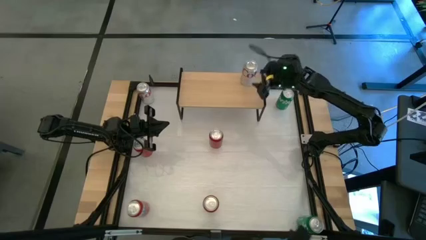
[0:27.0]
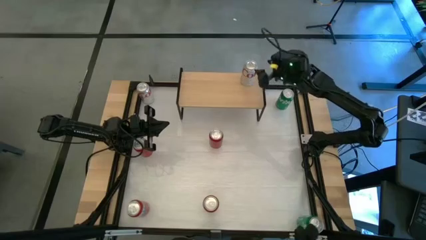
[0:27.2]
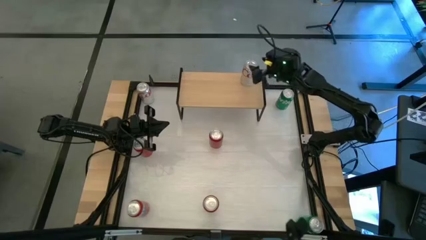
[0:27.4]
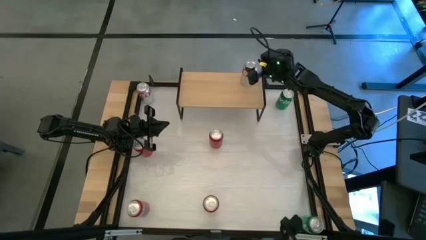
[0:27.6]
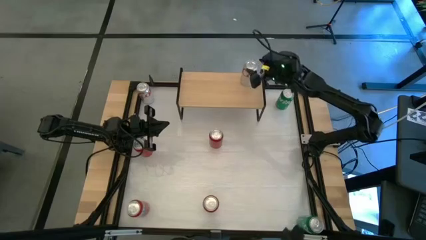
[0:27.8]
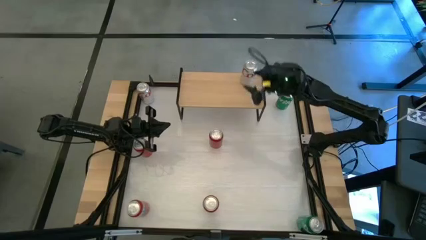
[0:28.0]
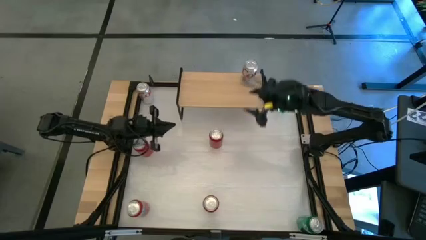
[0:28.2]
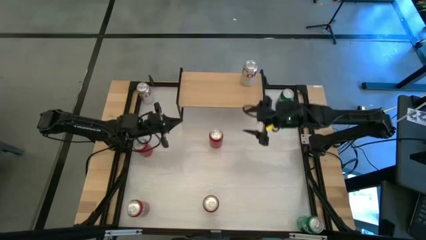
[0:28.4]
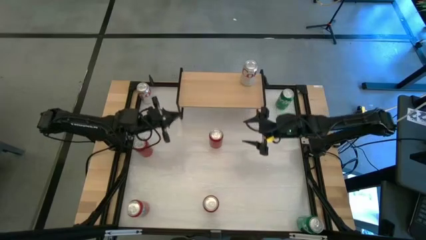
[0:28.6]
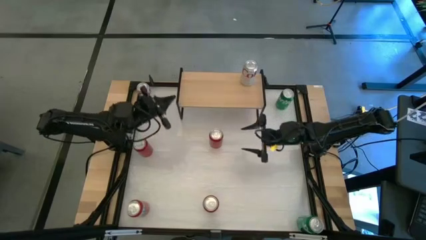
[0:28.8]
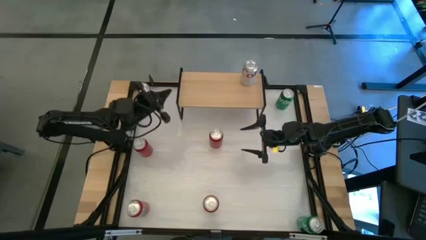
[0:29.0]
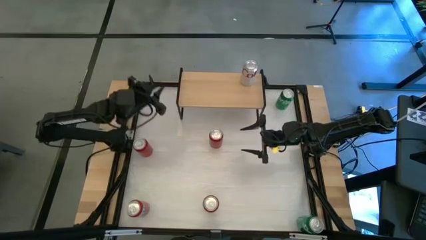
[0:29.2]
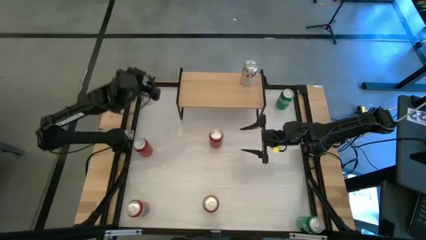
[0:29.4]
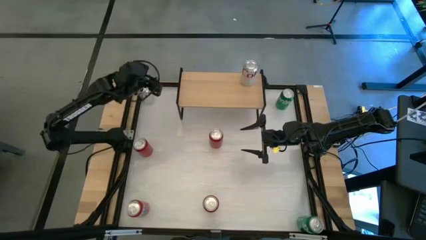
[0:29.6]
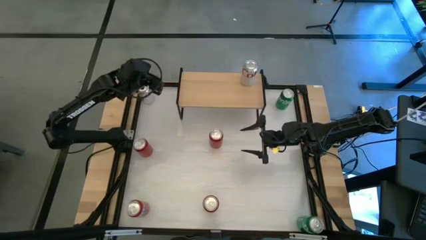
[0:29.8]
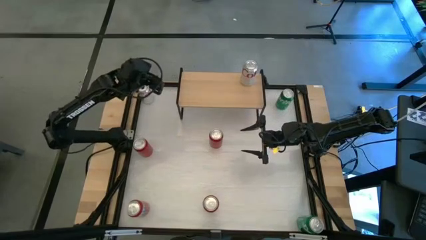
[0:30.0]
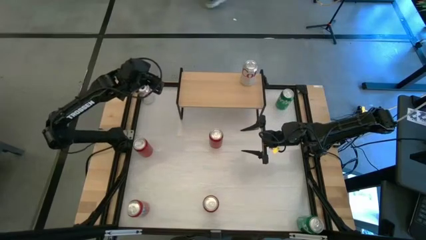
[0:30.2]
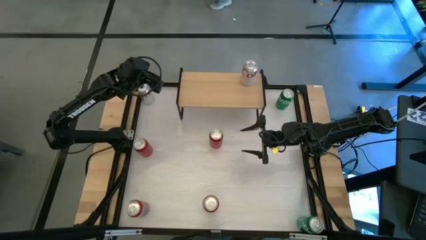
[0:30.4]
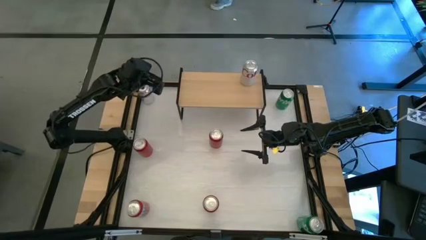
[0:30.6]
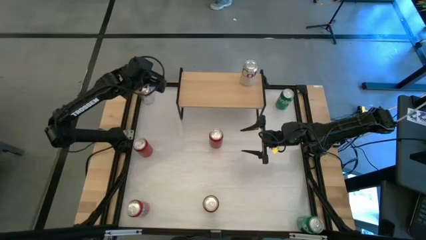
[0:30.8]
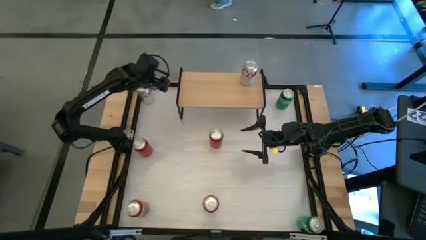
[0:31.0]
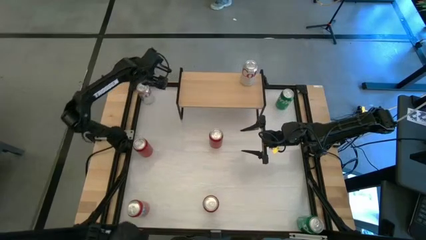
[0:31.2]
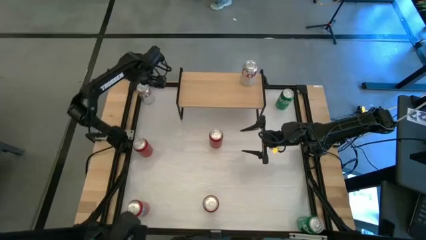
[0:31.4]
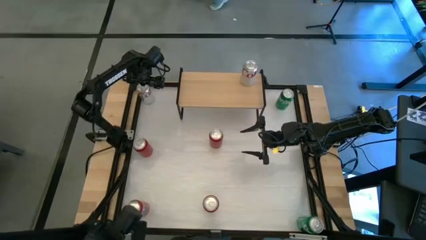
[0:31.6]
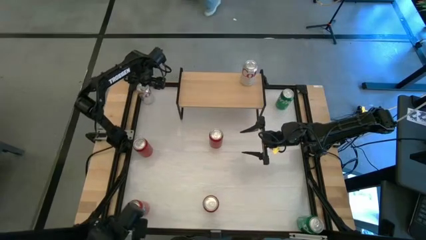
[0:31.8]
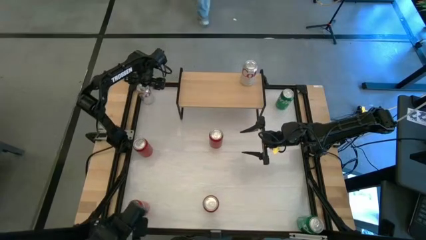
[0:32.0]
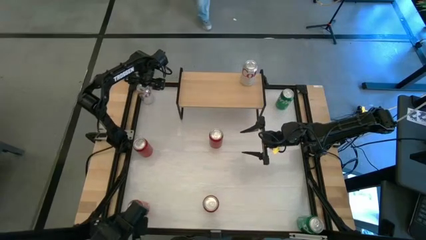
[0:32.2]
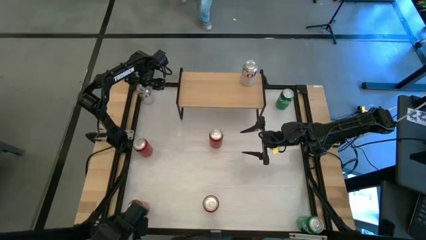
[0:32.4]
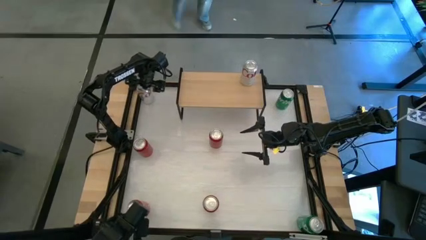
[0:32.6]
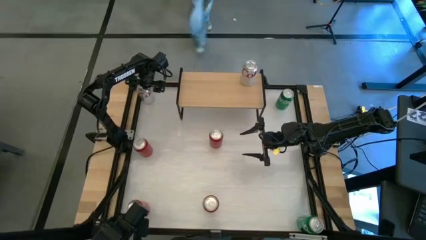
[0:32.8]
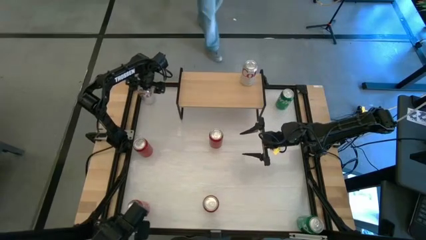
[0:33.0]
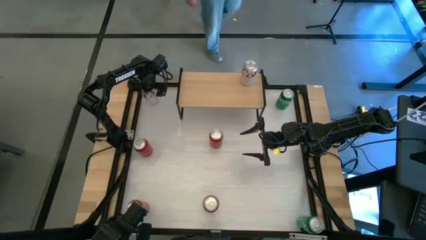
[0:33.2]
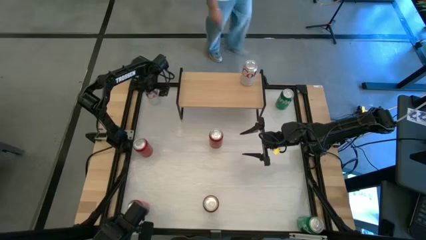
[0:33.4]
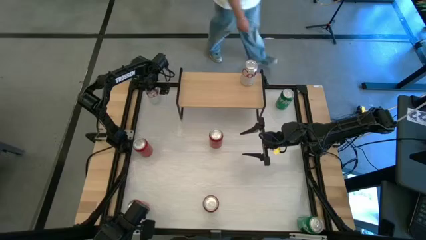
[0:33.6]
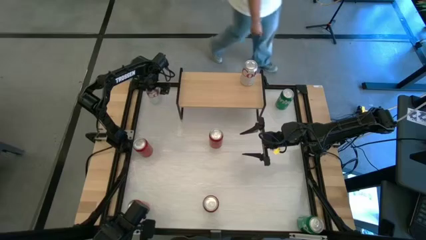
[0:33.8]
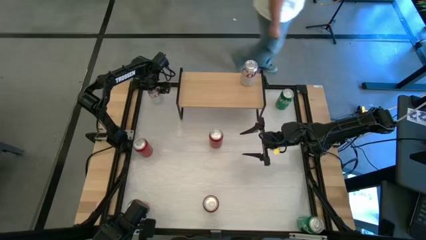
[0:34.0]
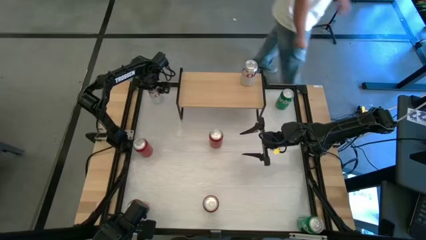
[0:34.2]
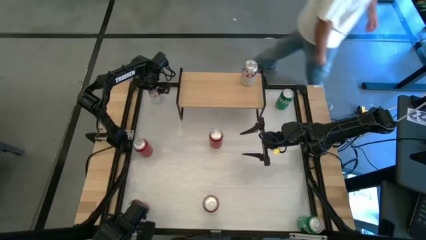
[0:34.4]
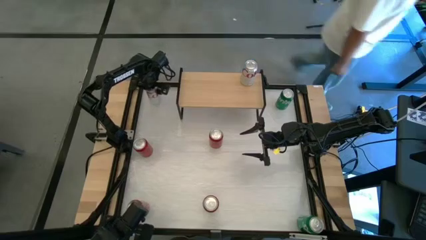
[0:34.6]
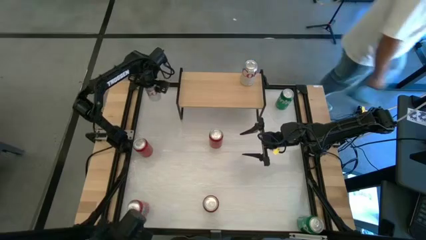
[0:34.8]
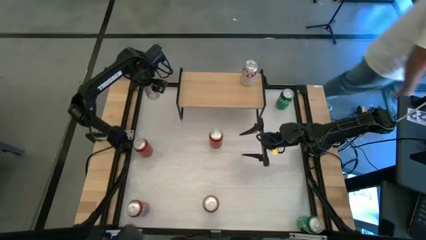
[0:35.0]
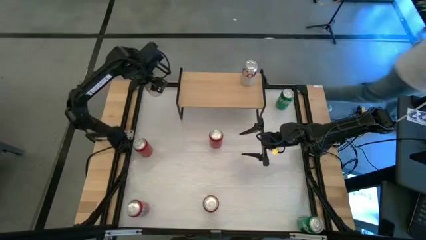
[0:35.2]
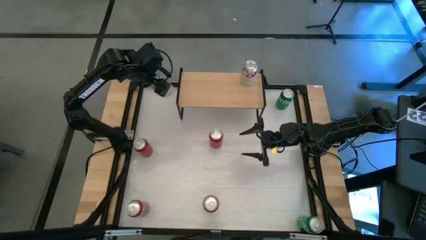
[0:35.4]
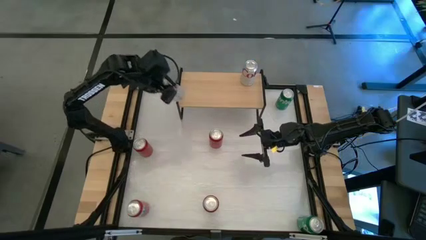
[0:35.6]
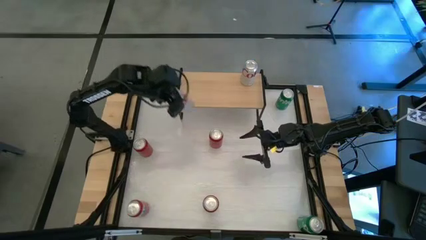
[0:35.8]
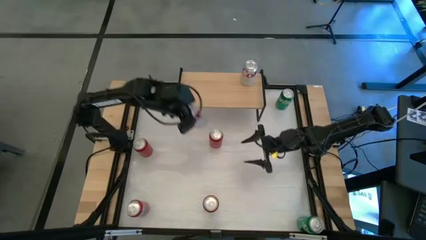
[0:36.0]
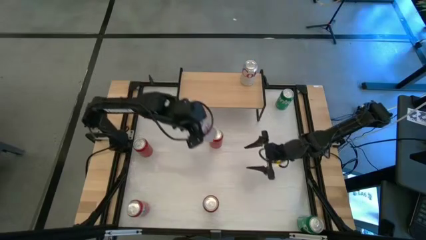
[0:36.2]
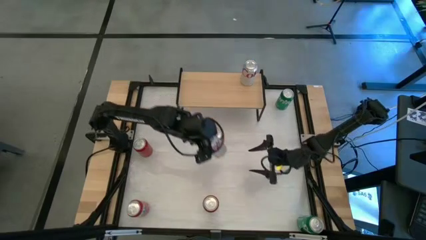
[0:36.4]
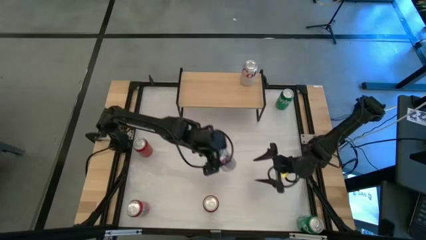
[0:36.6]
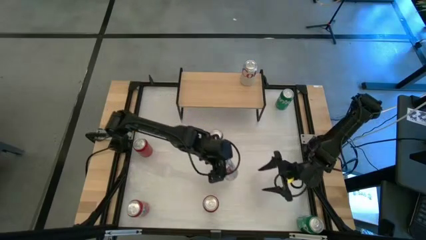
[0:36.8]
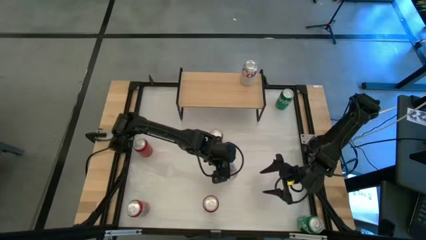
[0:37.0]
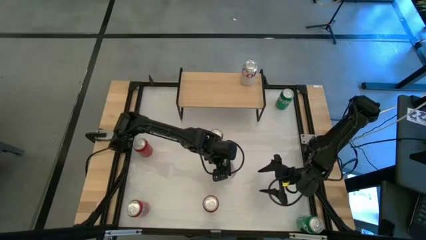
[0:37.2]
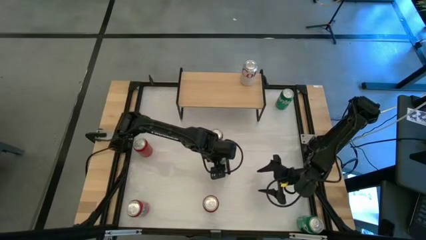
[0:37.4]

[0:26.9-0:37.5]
Task: Place canned beverage on shelf
Put the white soda can on the shelf aligned with the other white soda can
